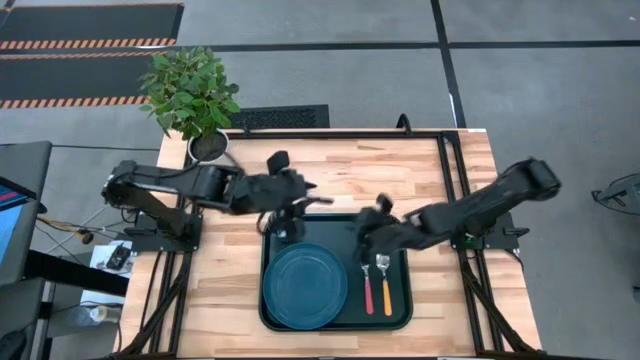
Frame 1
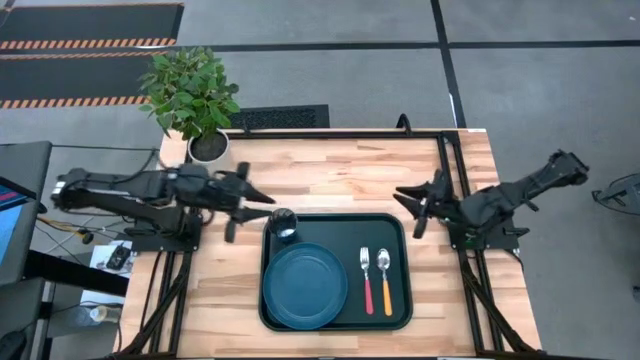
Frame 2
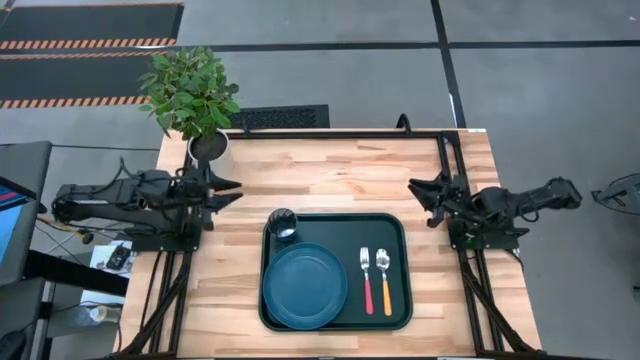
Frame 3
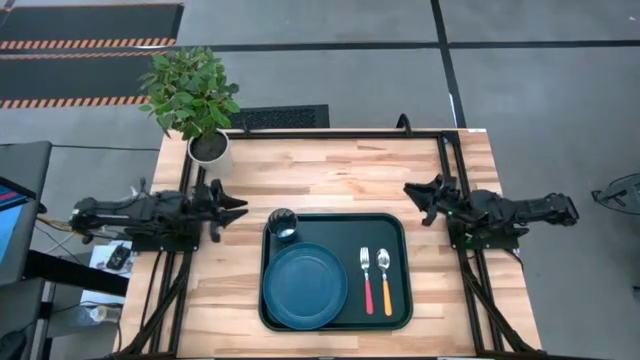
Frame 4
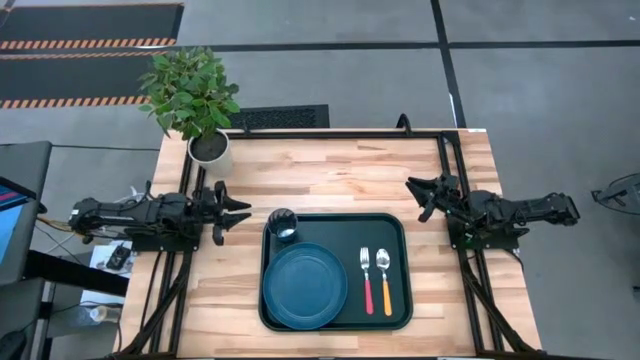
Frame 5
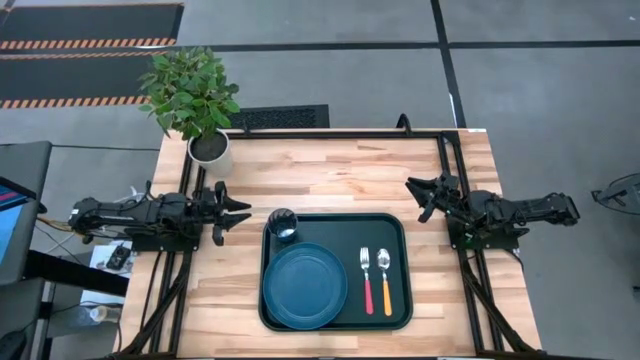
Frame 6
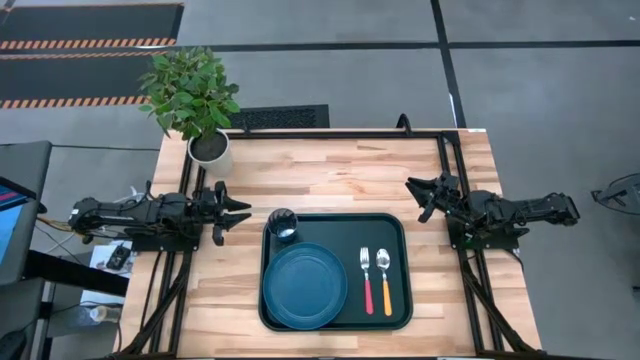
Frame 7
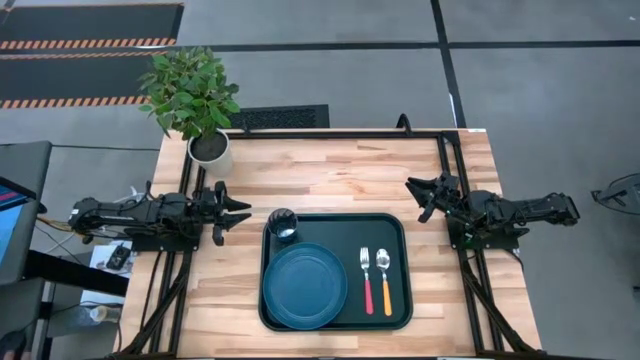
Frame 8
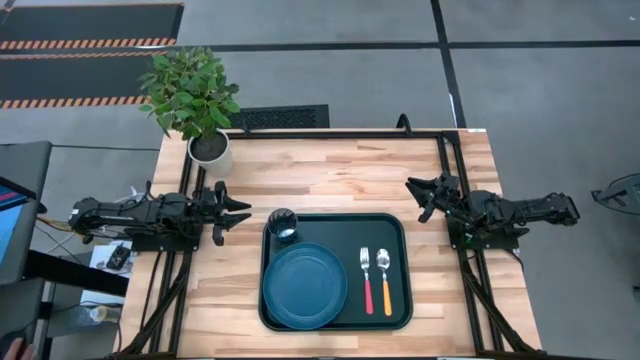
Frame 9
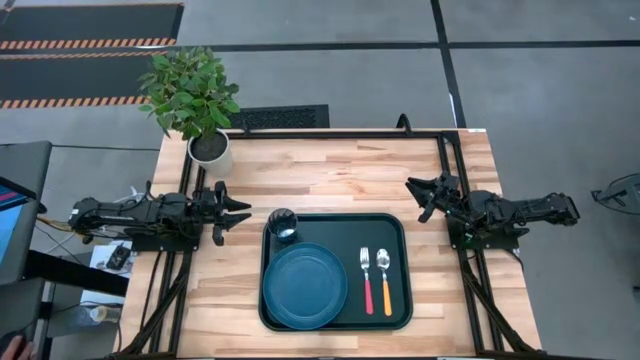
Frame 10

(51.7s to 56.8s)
Task: Pick and place plate/cup/fork/spoon on tray
Return to Home Position

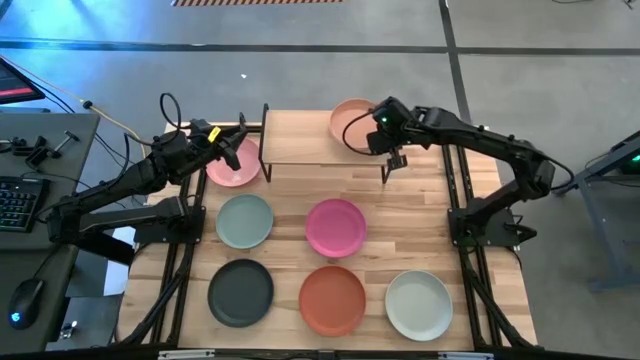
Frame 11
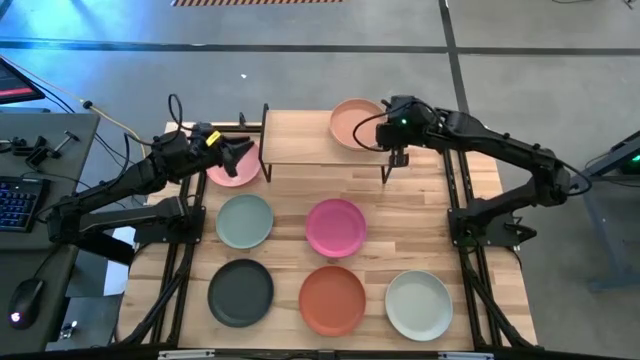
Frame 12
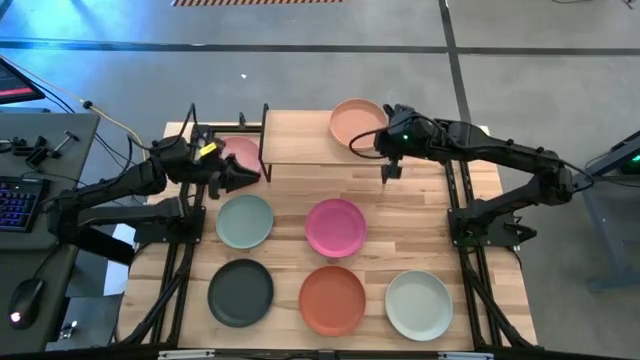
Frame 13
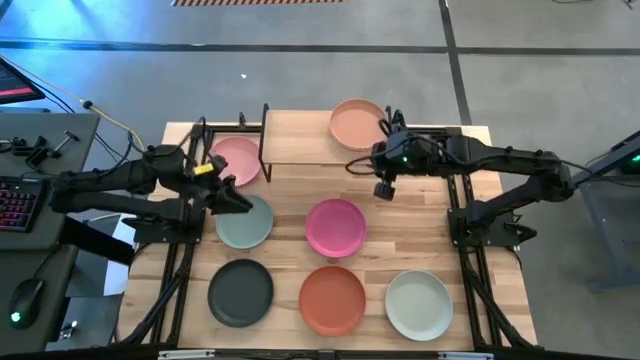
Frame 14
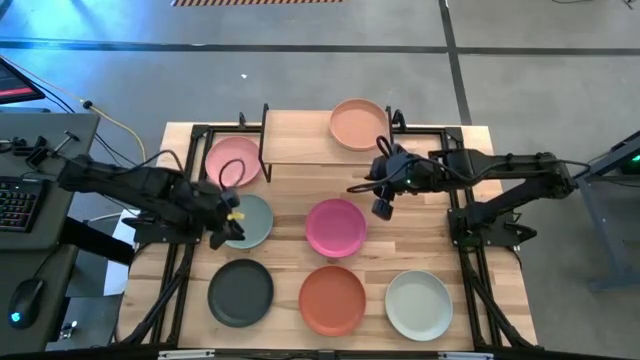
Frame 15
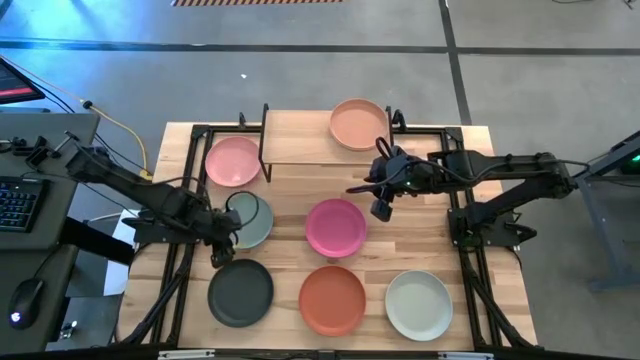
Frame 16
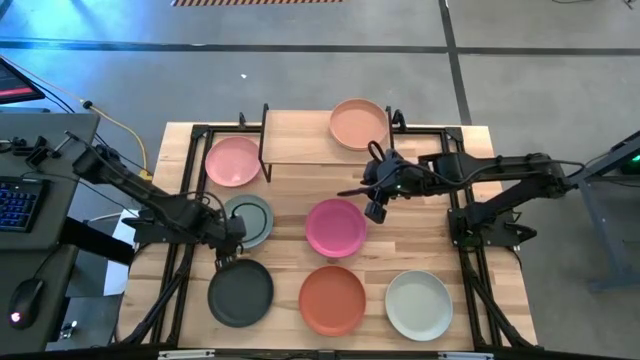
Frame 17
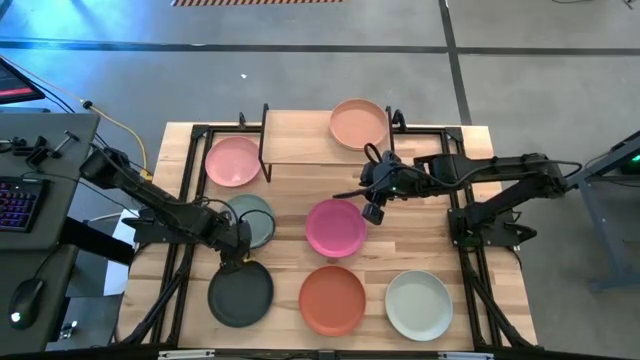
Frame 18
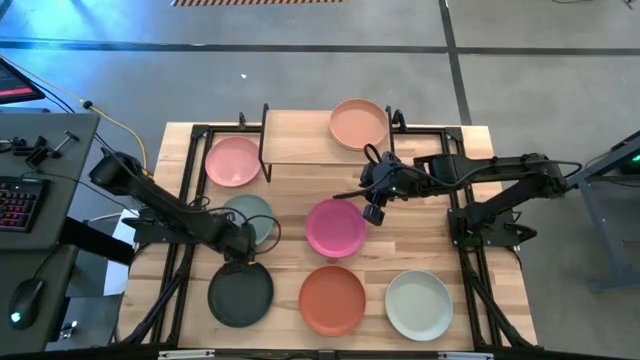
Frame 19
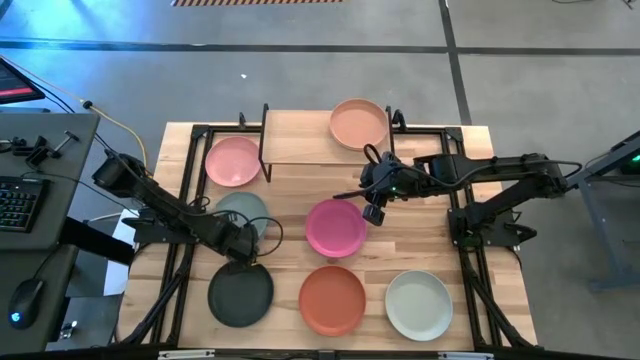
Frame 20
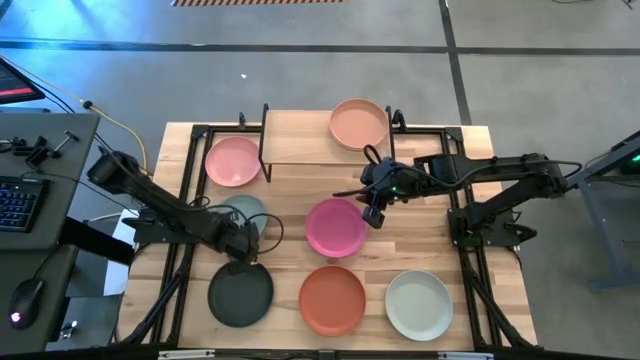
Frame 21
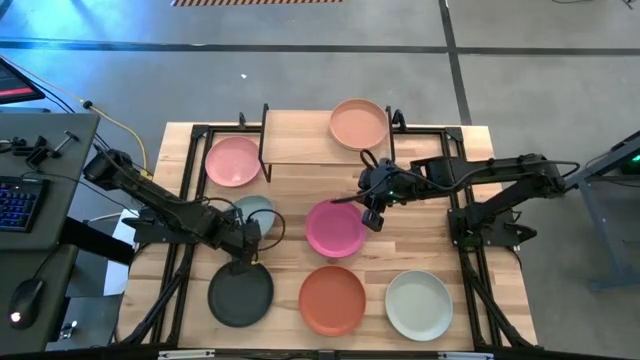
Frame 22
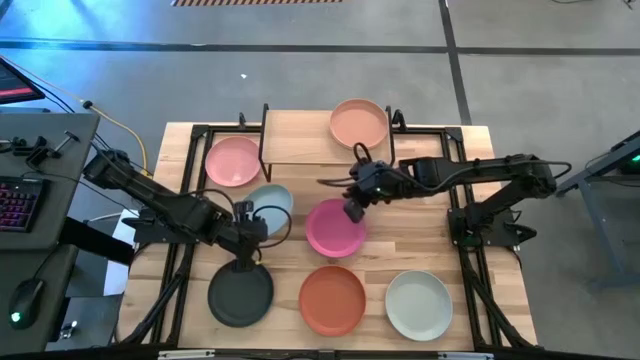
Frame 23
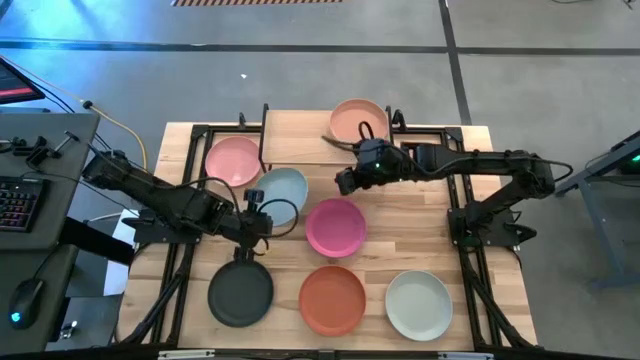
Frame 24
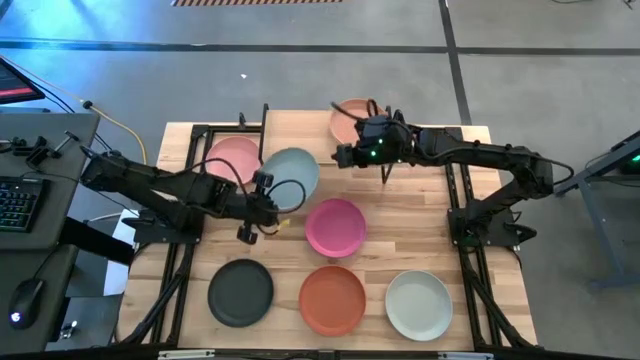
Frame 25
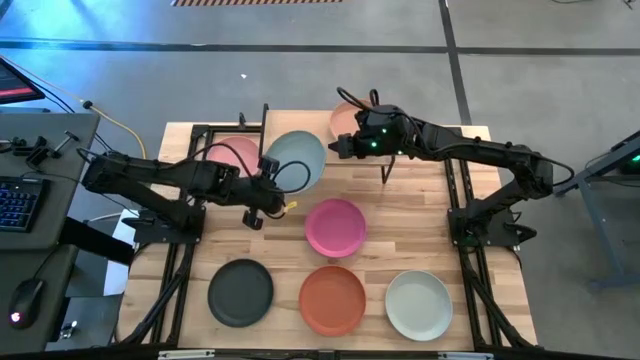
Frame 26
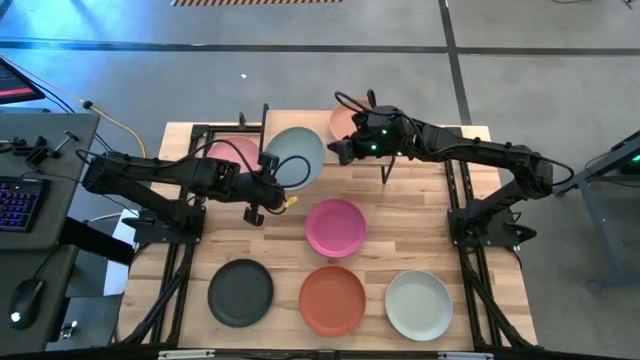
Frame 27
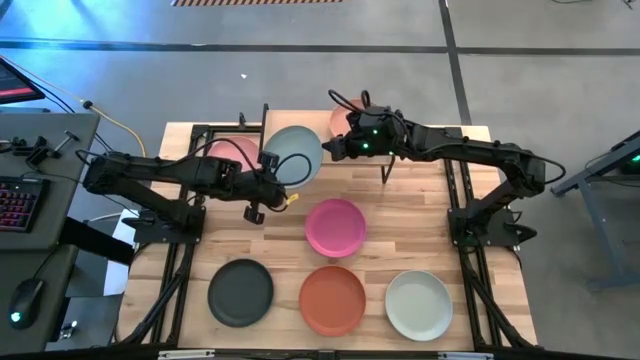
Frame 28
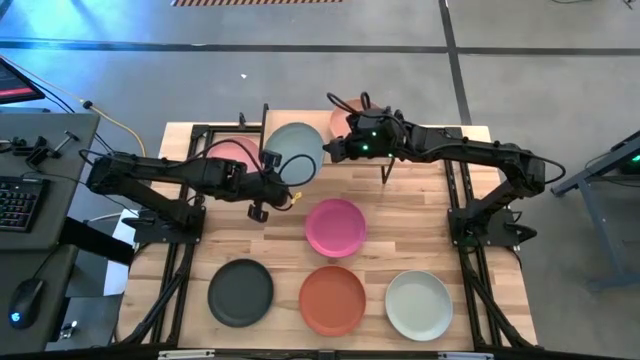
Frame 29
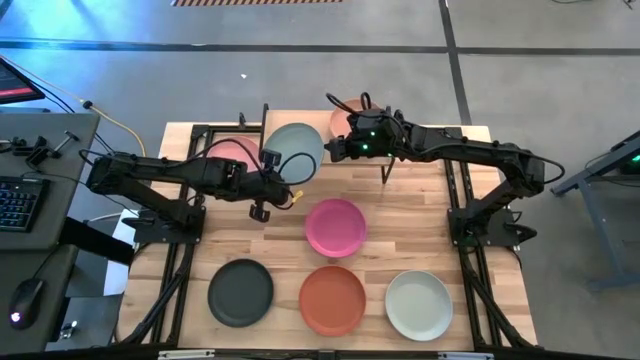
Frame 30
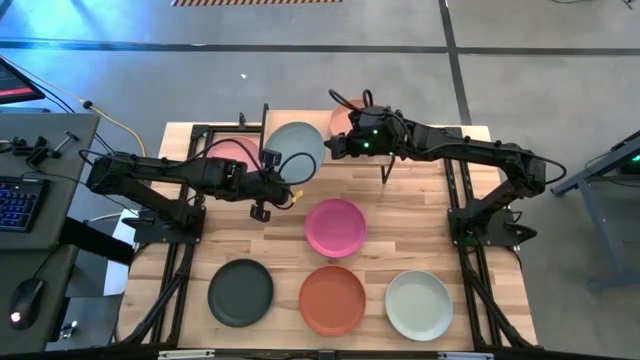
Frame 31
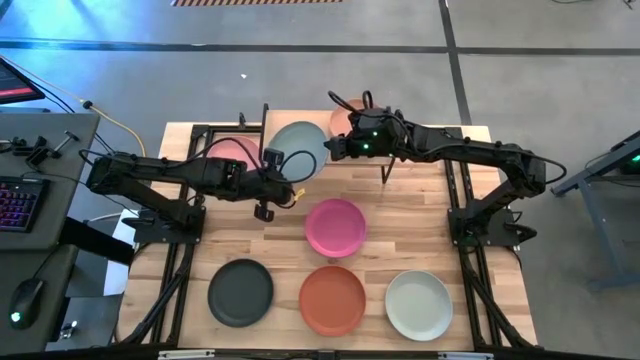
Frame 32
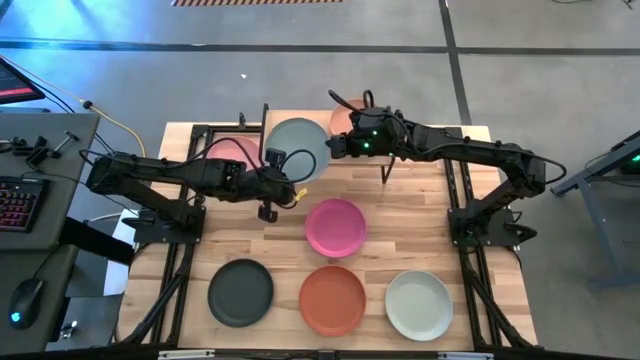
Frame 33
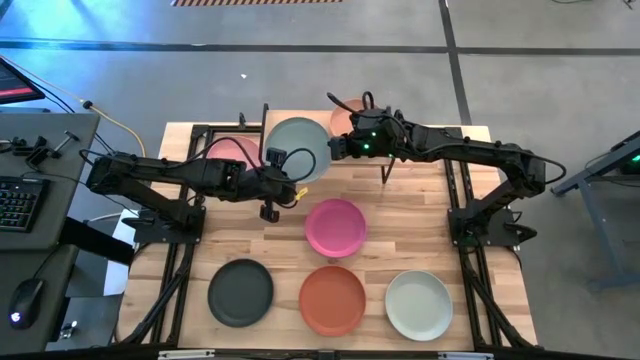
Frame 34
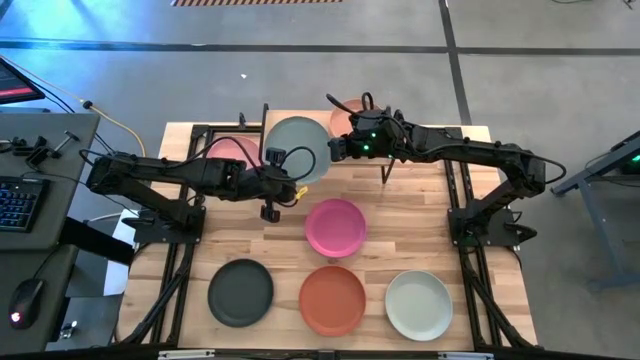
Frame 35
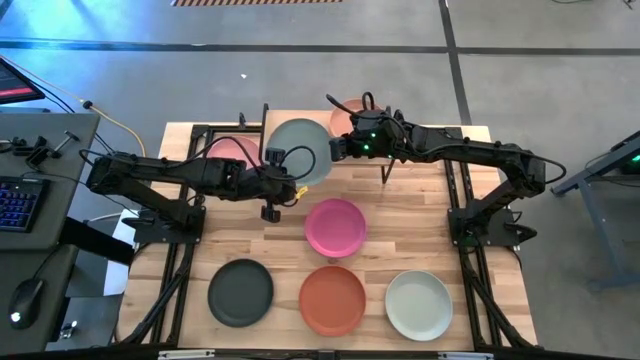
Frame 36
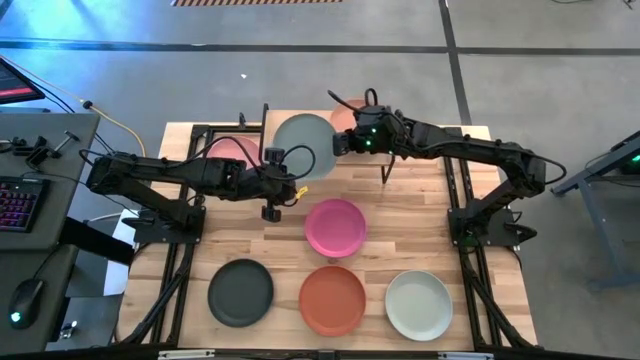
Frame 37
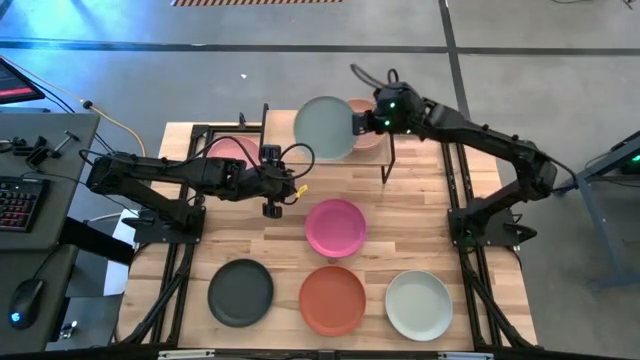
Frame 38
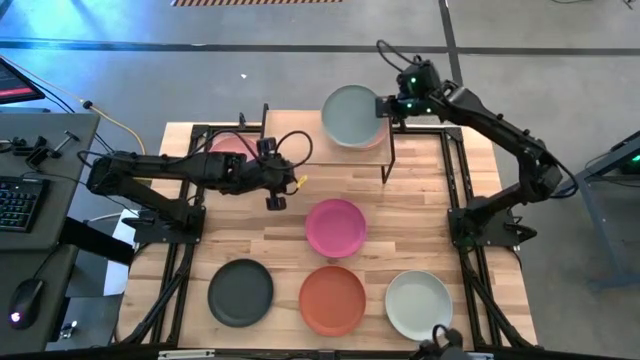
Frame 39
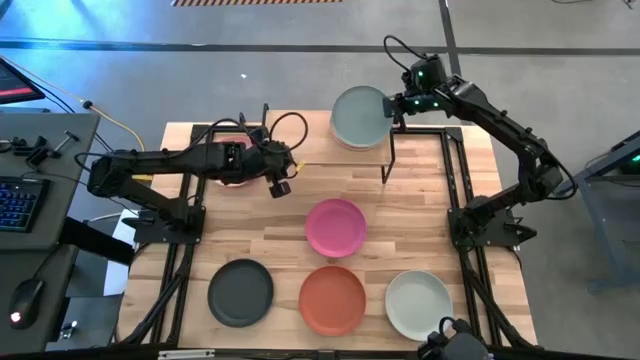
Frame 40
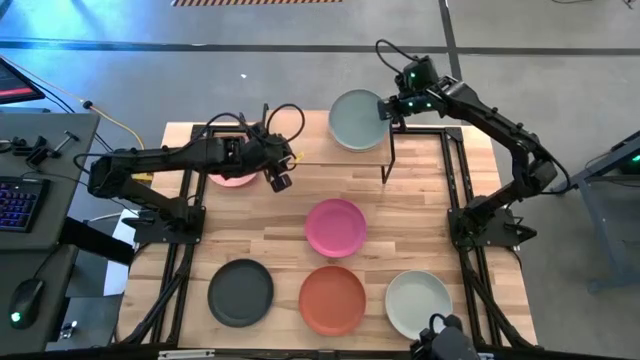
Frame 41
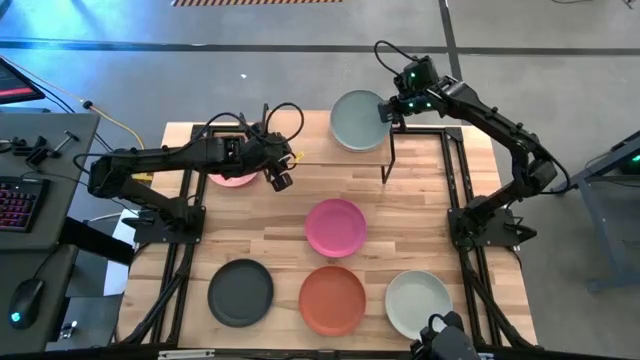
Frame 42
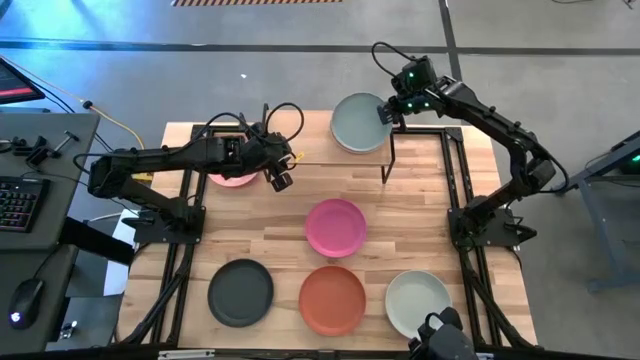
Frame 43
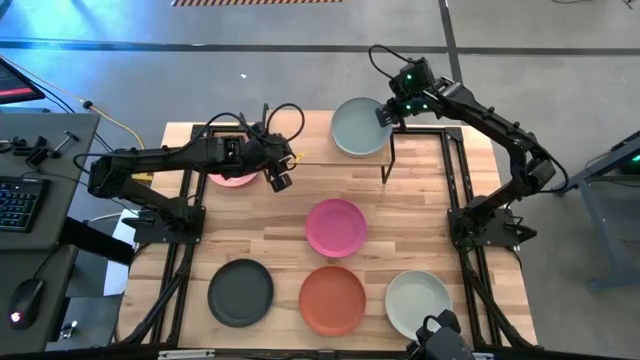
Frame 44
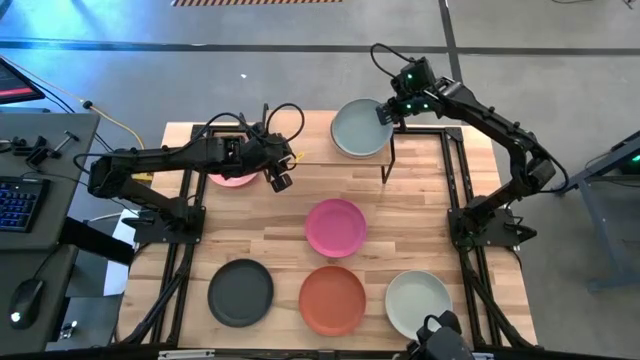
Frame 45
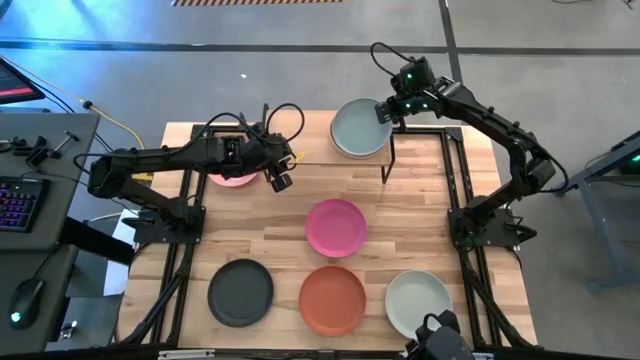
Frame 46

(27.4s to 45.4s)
Task: Place and stack plates onto a shelf
Stack the gray plate on top of the brown plate on the shelf
